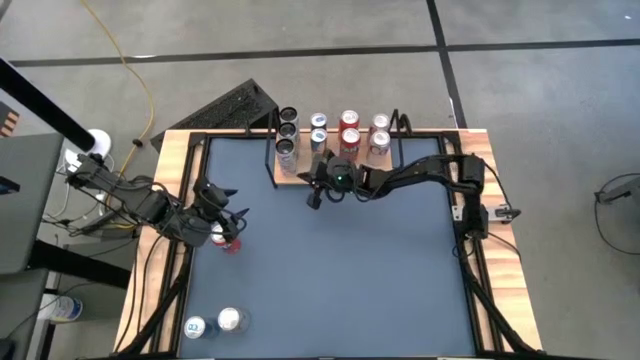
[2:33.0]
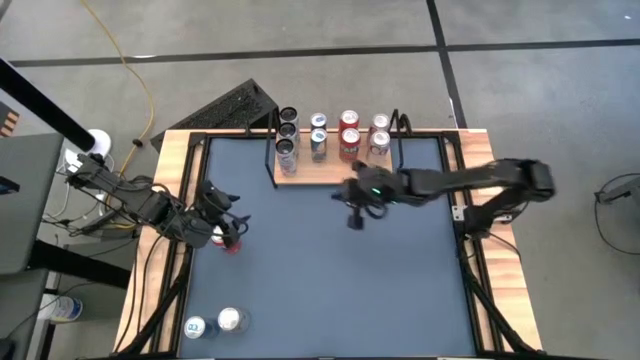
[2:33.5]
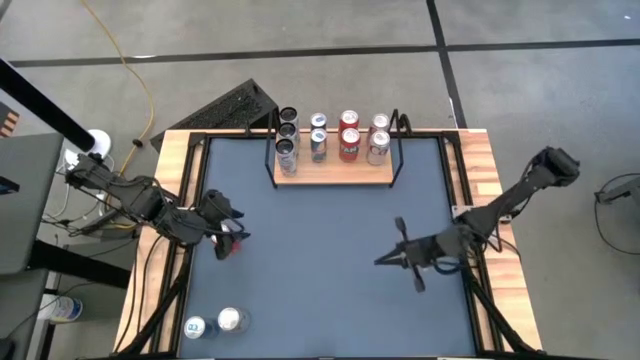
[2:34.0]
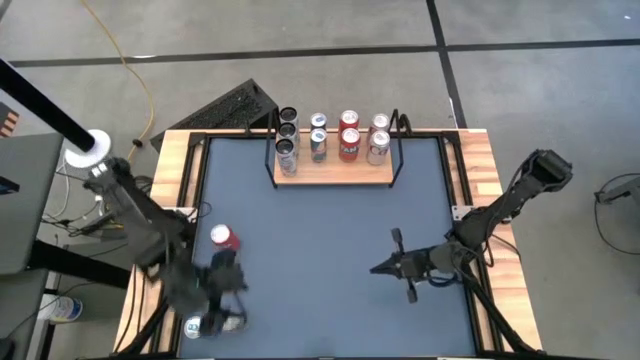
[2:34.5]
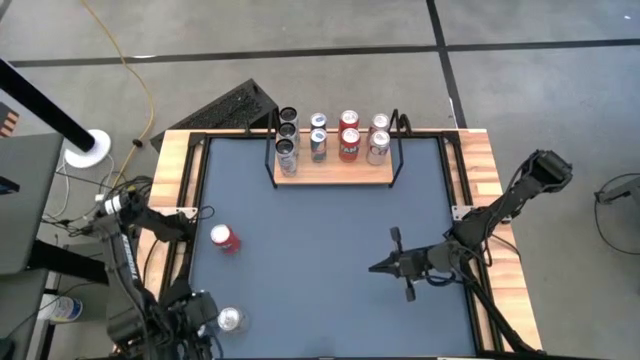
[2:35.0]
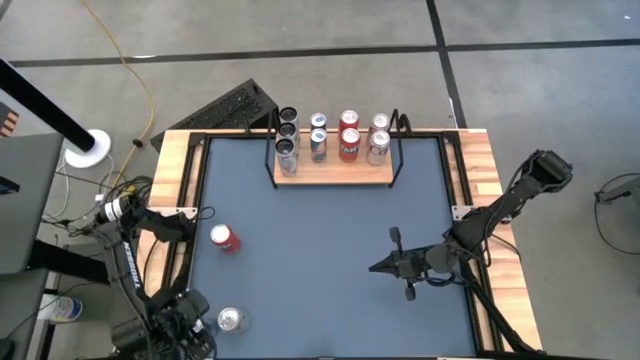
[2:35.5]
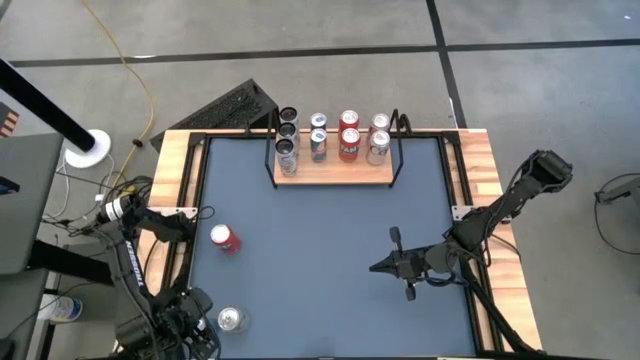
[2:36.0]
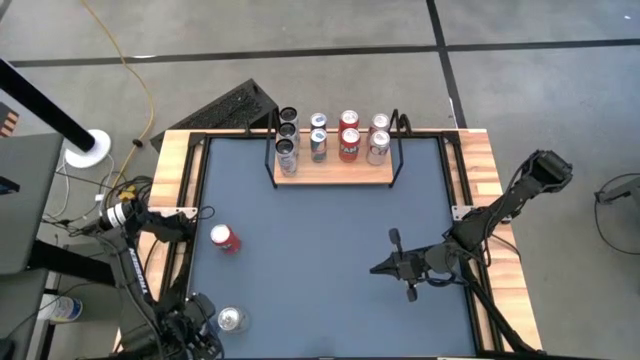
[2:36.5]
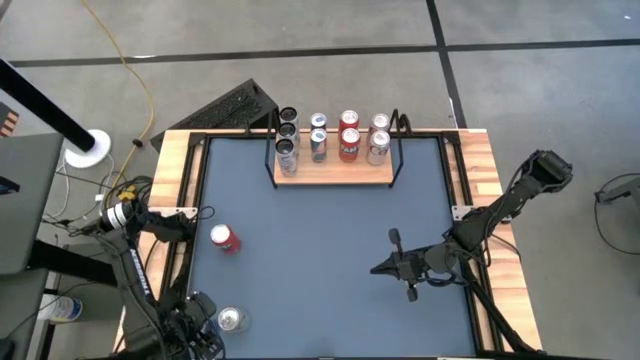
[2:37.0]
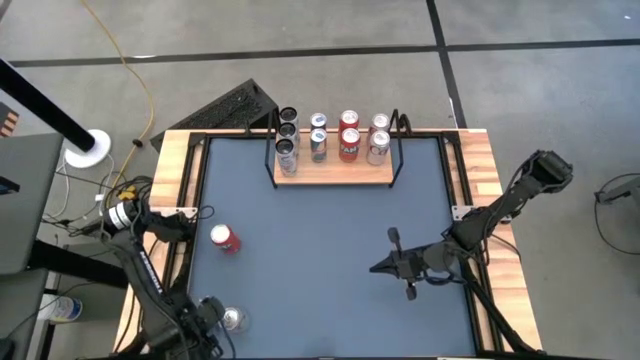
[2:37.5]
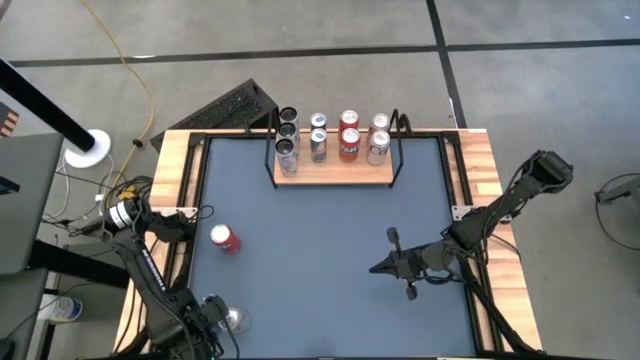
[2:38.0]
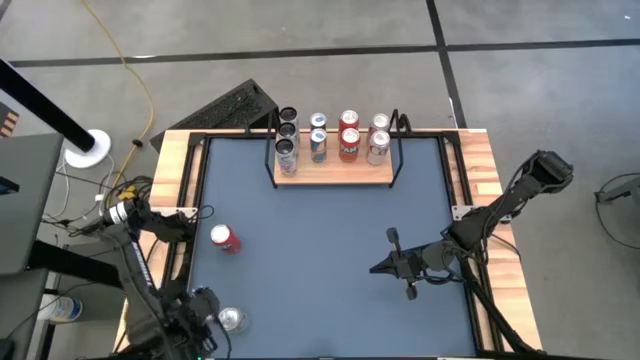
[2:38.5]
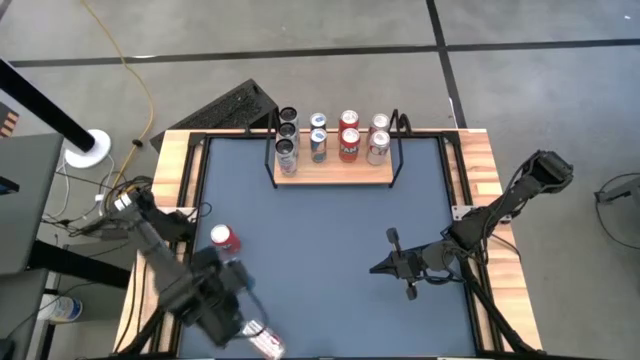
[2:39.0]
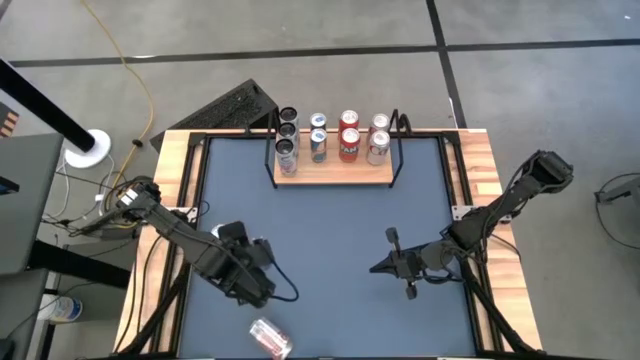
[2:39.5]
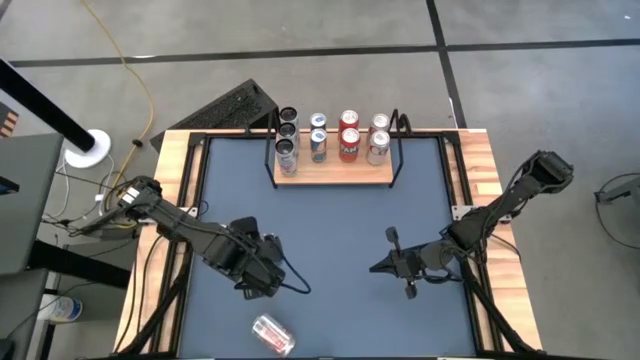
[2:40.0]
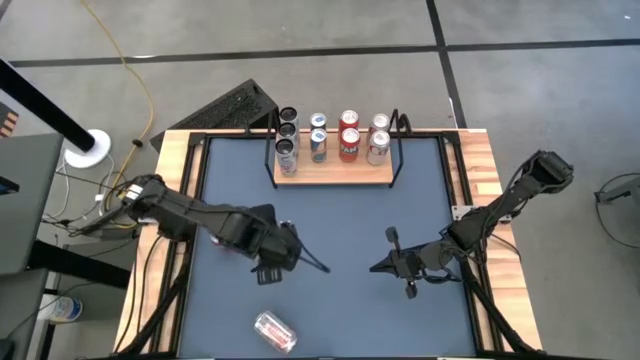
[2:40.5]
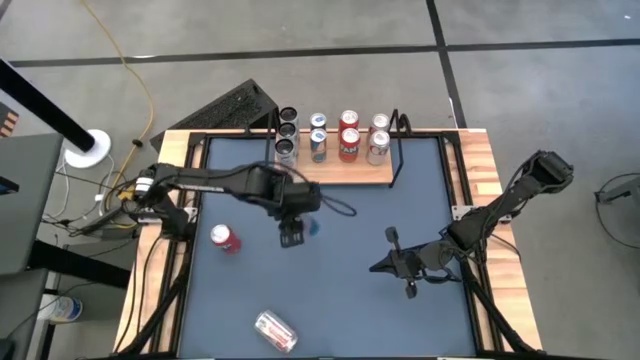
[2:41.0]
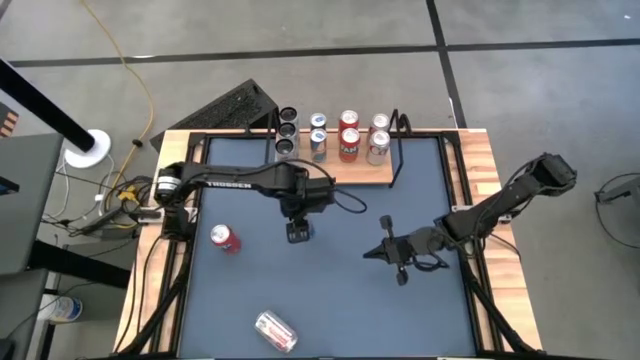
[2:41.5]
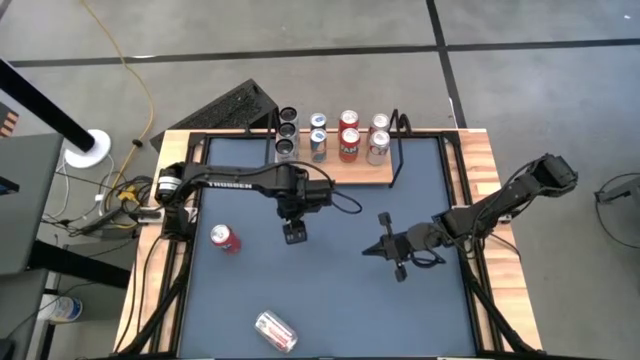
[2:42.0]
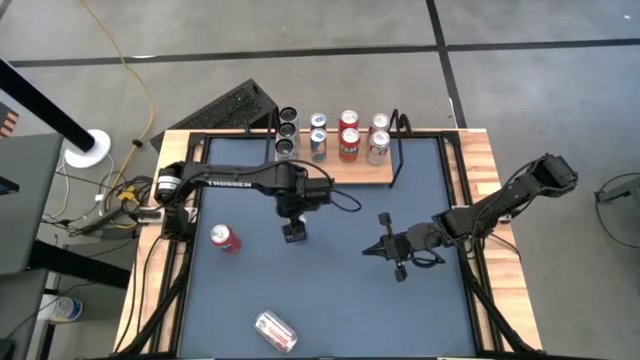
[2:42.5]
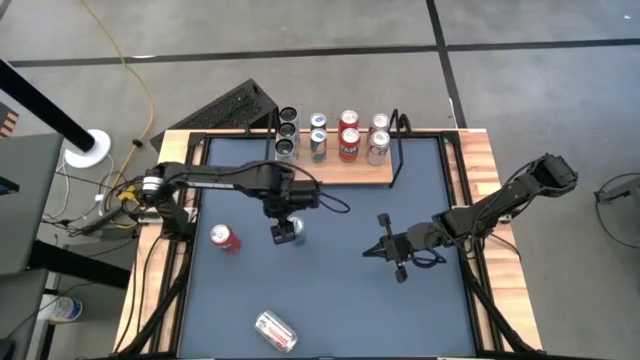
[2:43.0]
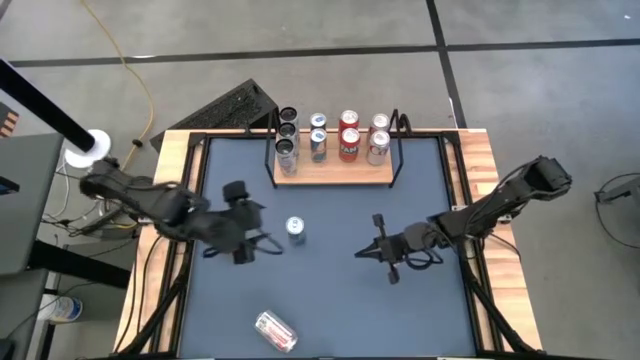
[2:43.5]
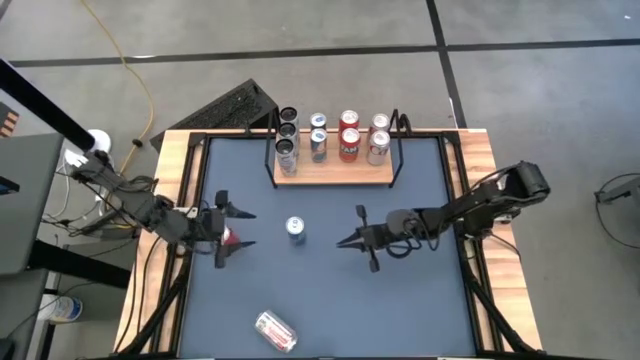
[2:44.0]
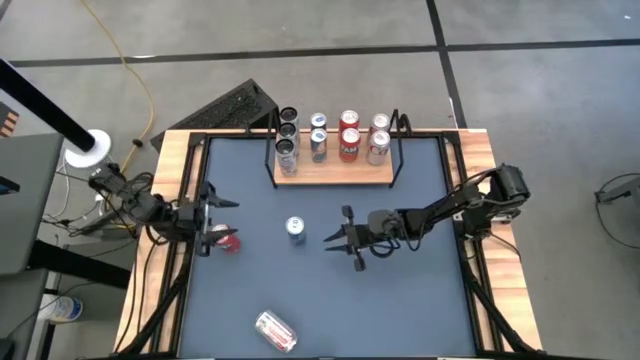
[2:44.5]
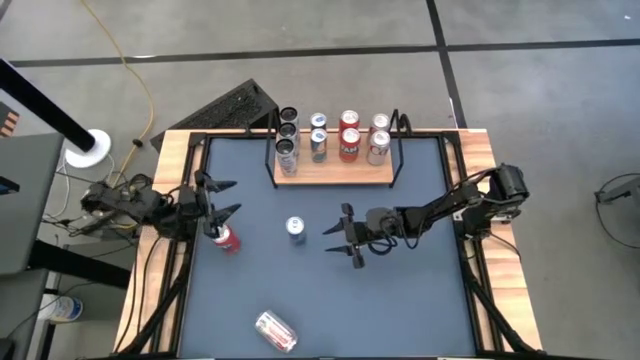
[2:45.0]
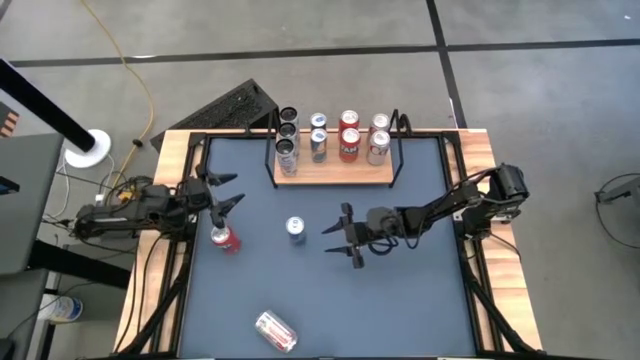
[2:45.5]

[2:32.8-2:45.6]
Task: Place canned beverage on shelf
Put the blue soda can on the shelf aligned with the other blue soda cans

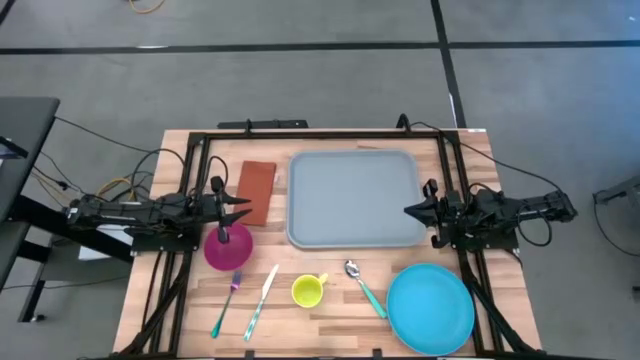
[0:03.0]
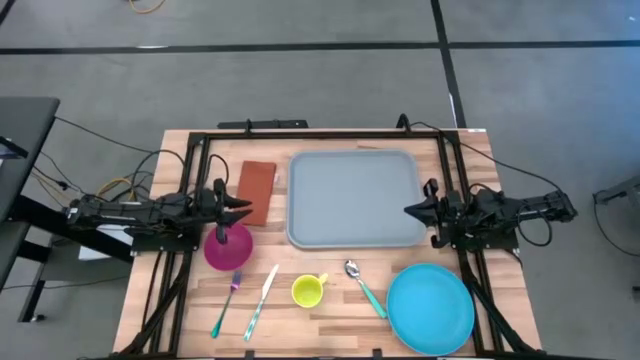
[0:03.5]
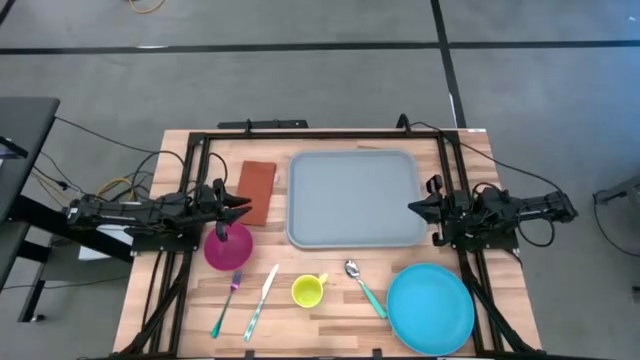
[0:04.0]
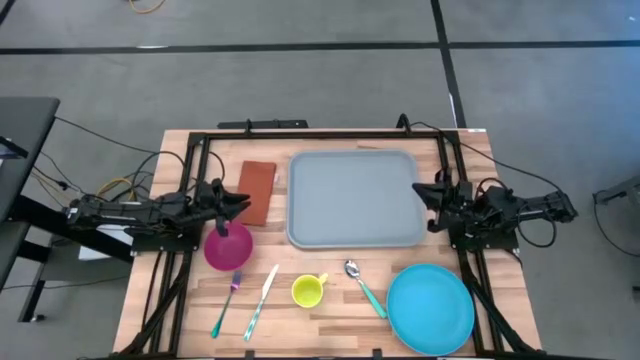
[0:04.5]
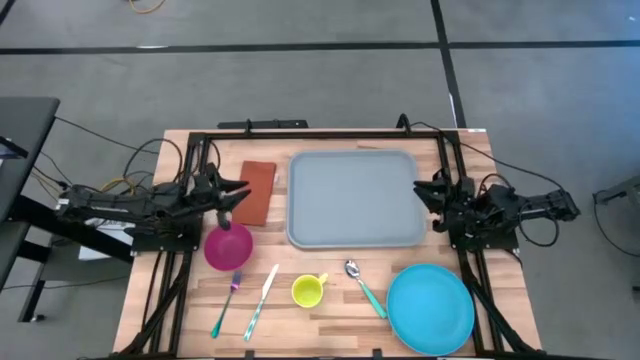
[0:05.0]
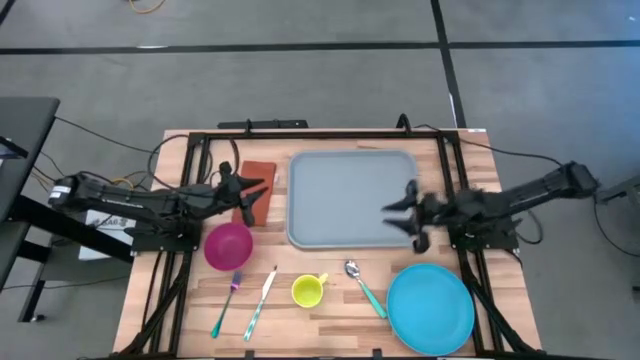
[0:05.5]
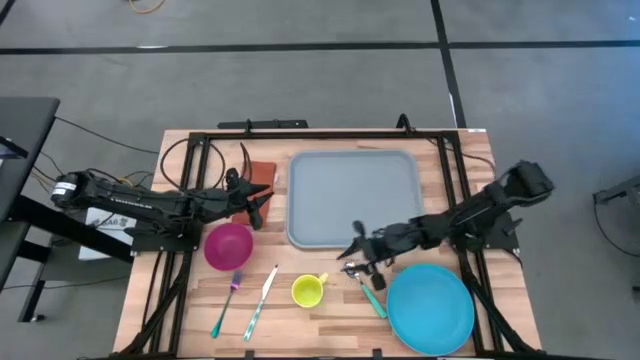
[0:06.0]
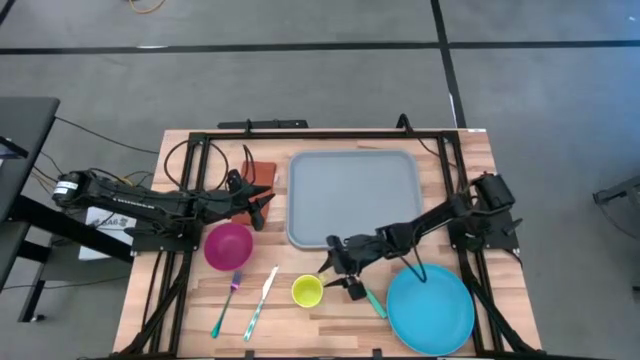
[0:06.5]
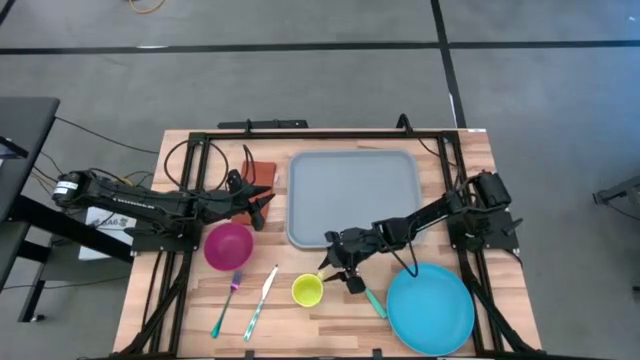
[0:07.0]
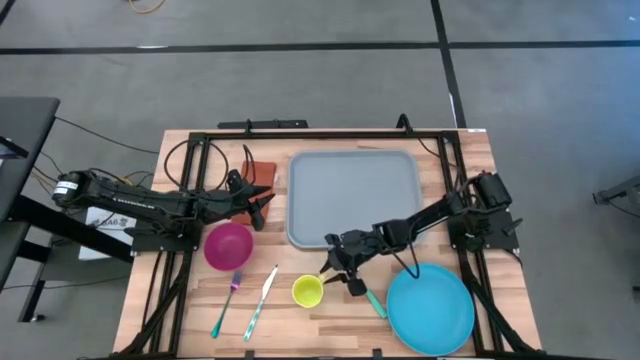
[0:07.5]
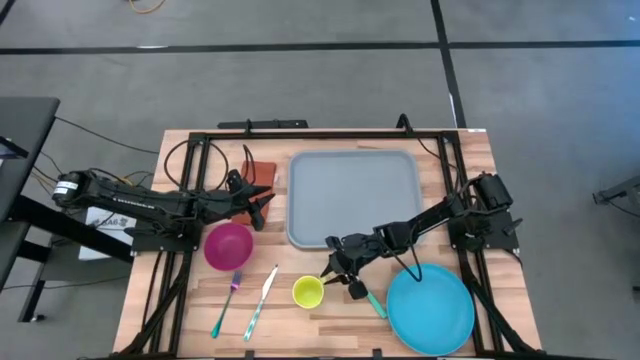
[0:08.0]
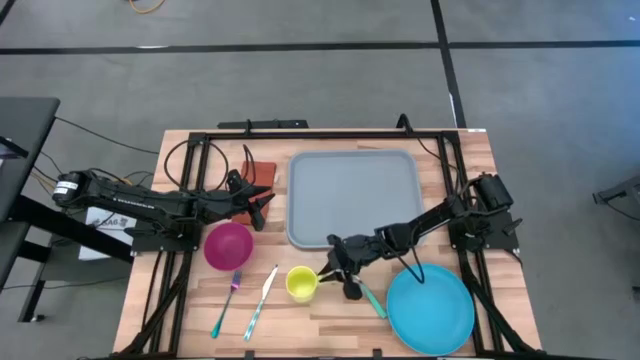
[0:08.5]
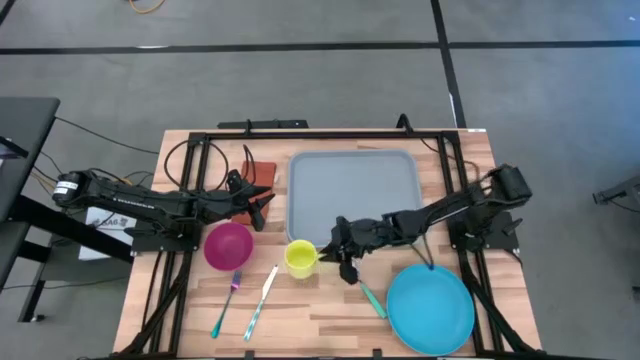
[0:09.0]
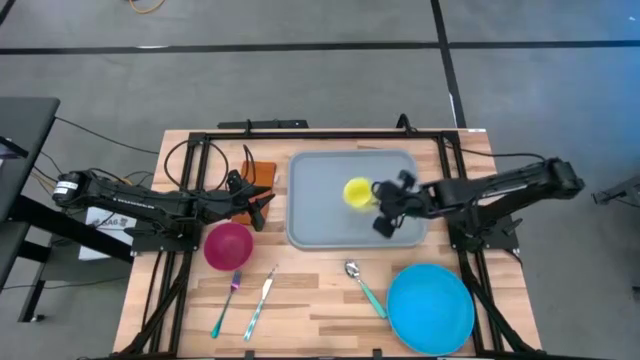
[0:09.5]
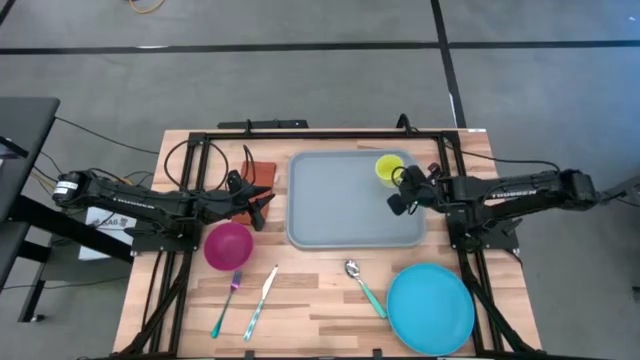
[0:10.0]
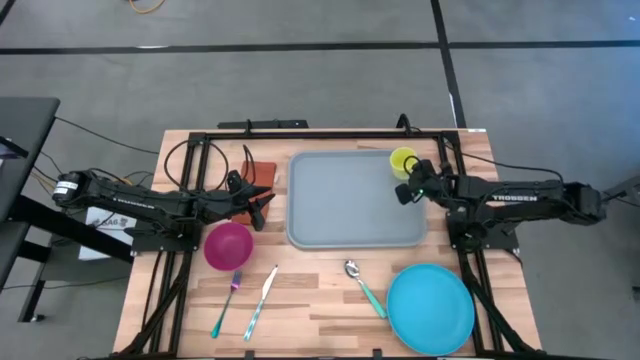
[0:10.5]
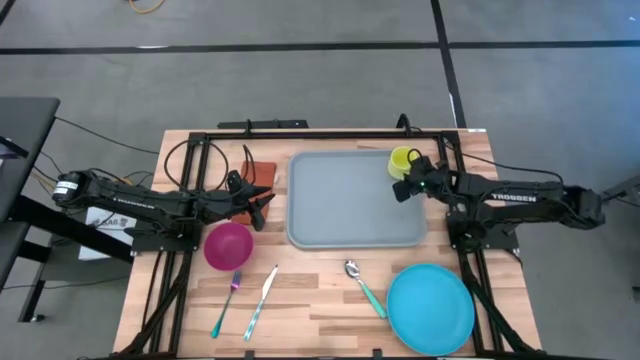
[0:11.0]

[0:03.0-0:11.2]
Task: Set up tray
Put the yellow mug on top of the gray tray
